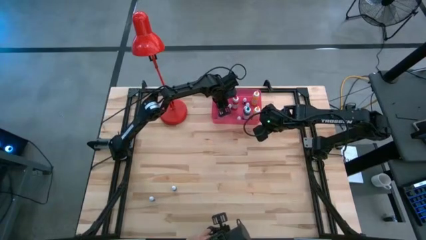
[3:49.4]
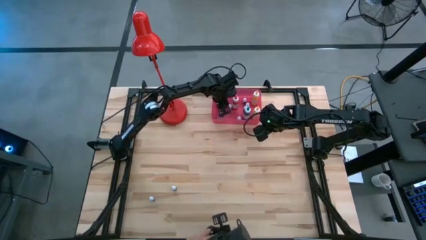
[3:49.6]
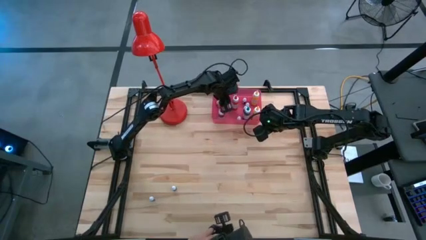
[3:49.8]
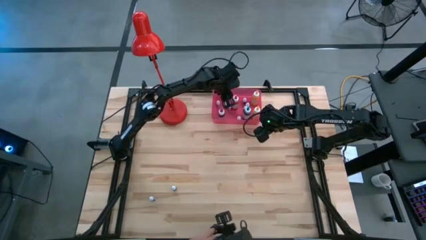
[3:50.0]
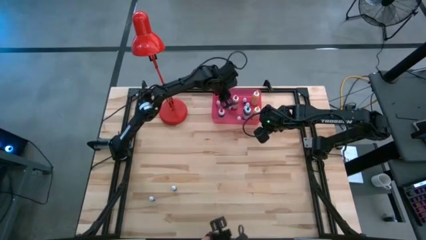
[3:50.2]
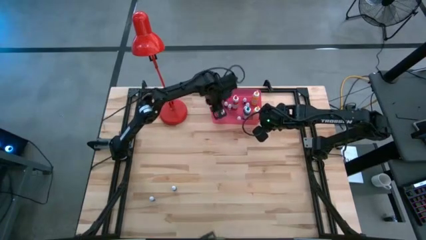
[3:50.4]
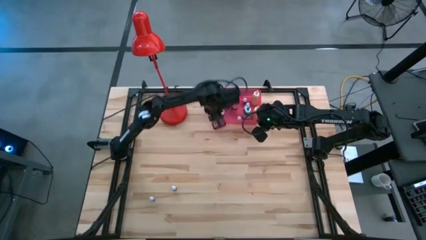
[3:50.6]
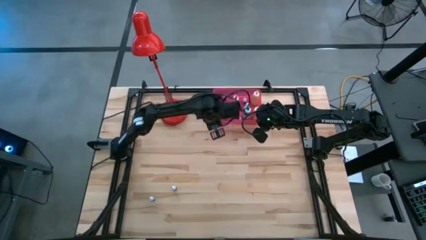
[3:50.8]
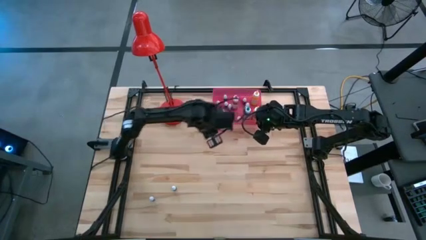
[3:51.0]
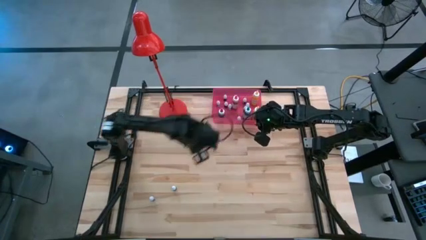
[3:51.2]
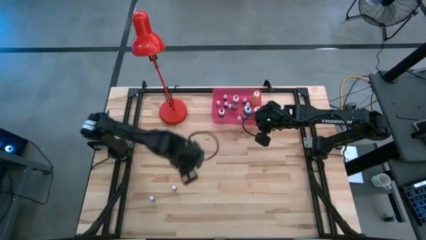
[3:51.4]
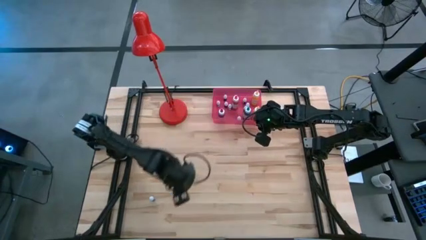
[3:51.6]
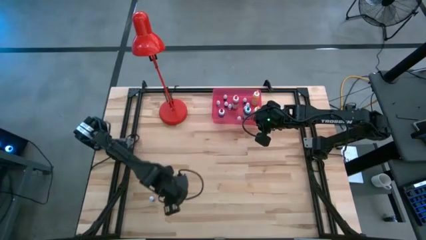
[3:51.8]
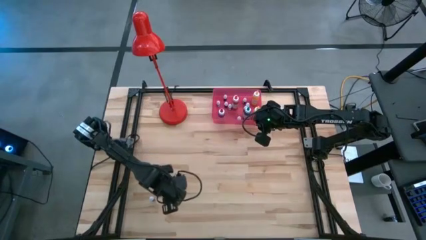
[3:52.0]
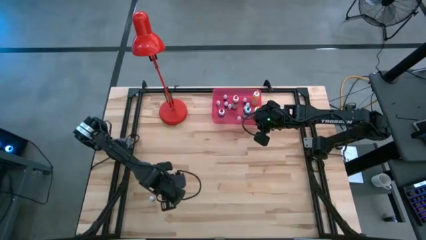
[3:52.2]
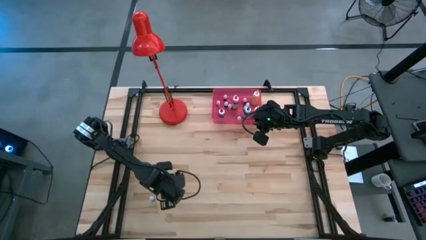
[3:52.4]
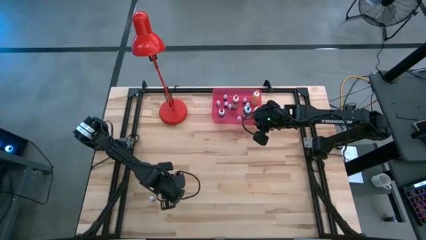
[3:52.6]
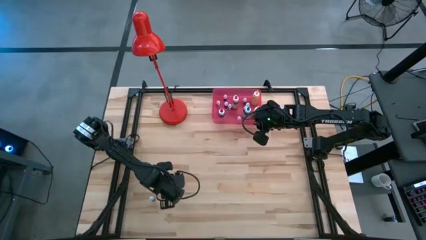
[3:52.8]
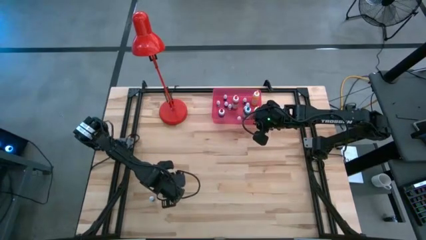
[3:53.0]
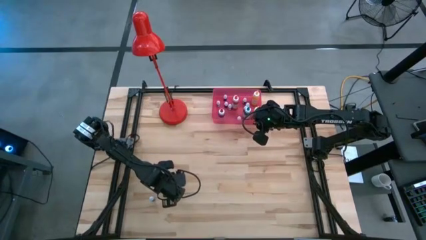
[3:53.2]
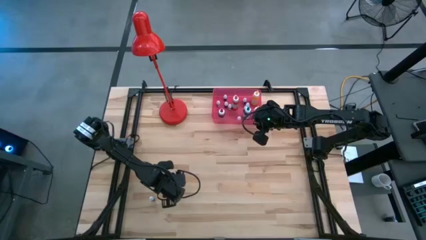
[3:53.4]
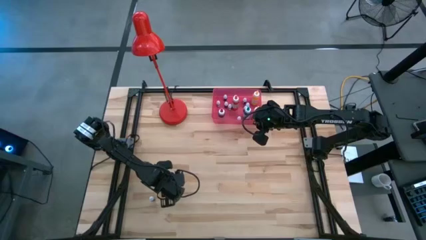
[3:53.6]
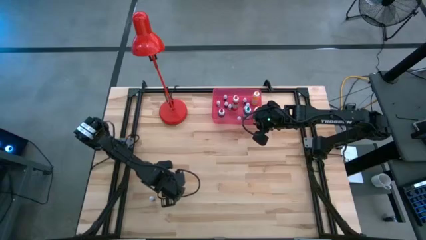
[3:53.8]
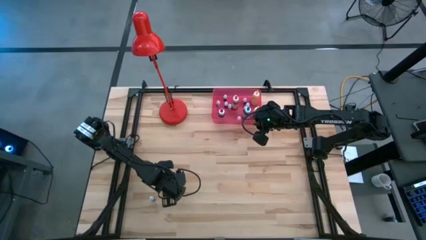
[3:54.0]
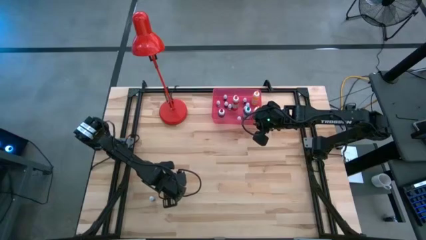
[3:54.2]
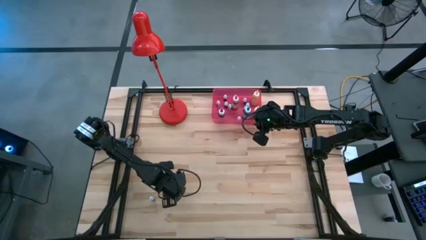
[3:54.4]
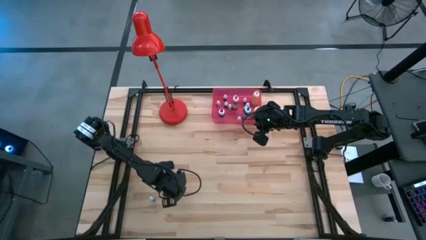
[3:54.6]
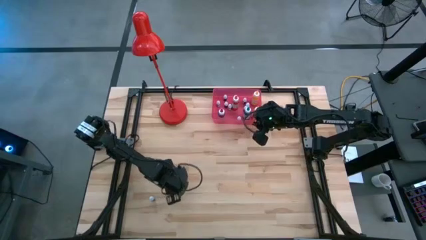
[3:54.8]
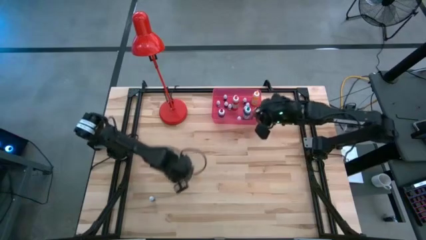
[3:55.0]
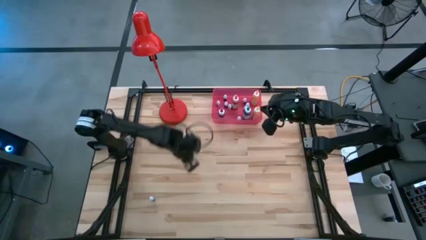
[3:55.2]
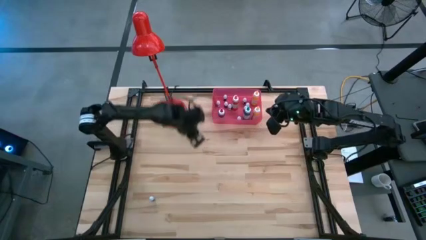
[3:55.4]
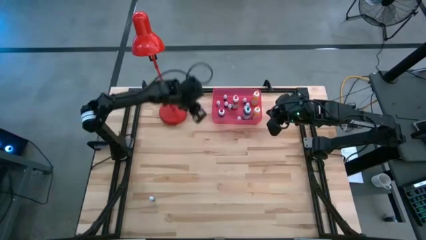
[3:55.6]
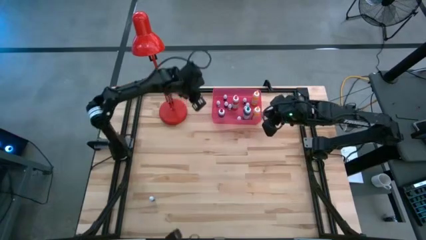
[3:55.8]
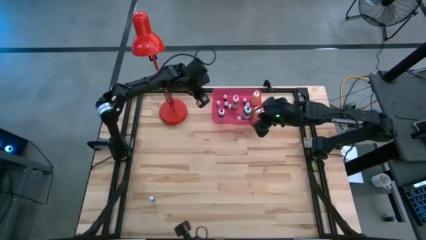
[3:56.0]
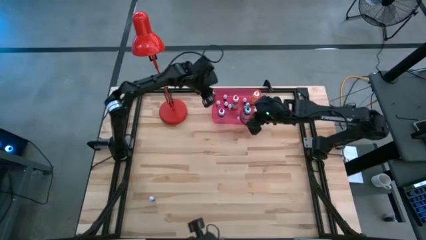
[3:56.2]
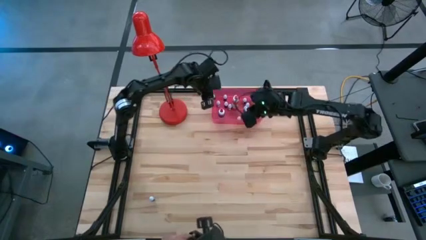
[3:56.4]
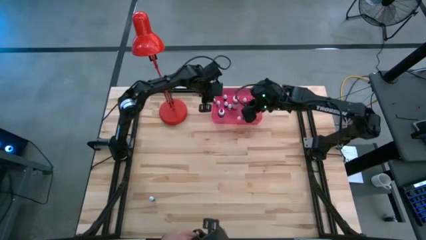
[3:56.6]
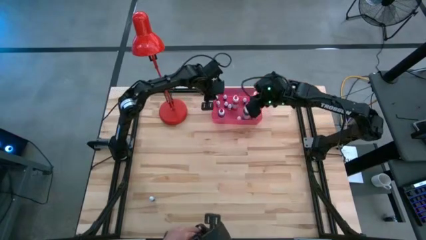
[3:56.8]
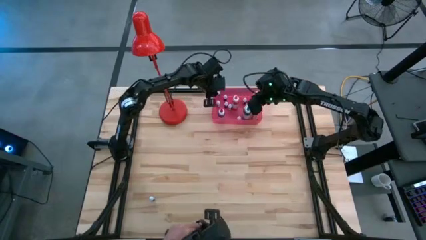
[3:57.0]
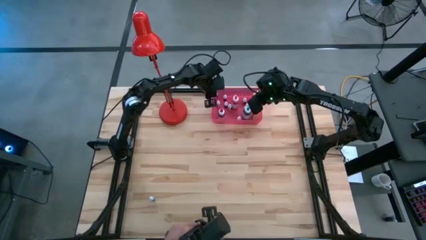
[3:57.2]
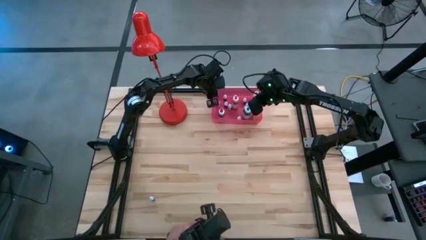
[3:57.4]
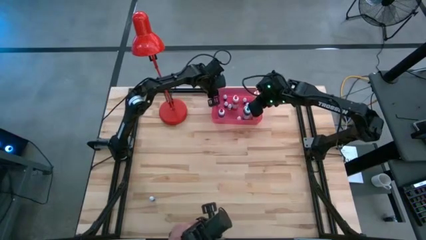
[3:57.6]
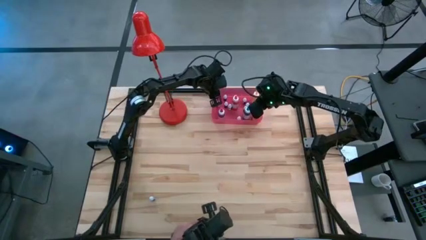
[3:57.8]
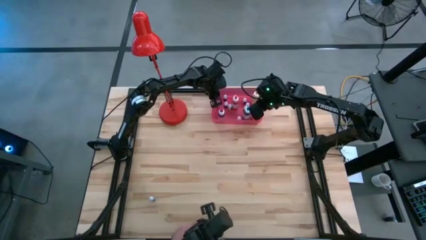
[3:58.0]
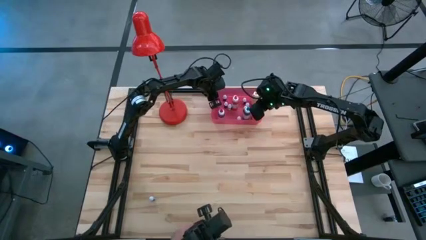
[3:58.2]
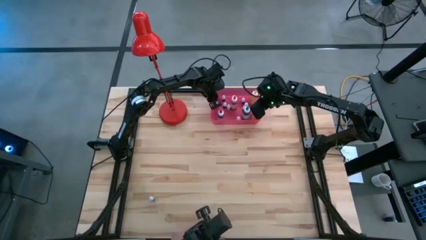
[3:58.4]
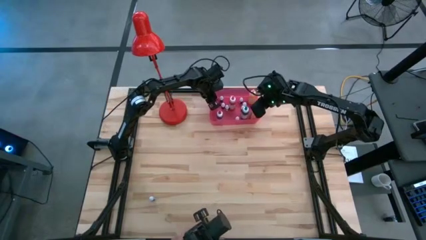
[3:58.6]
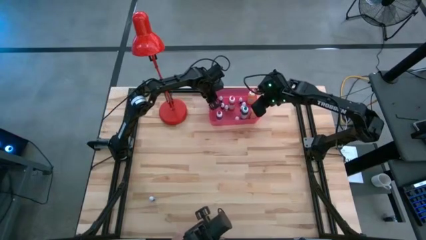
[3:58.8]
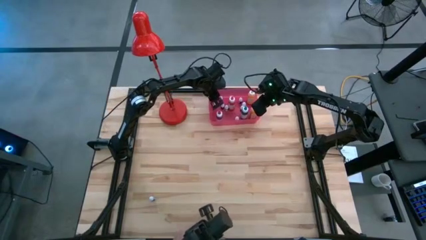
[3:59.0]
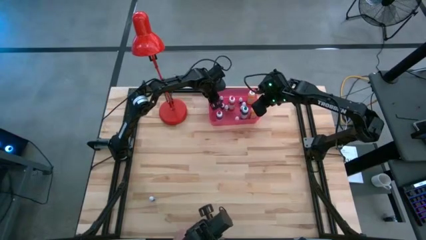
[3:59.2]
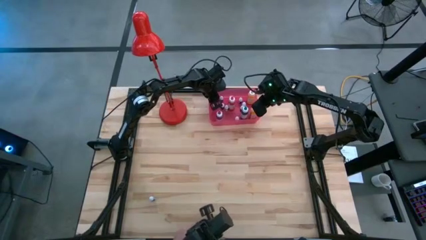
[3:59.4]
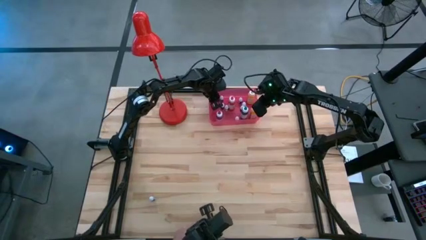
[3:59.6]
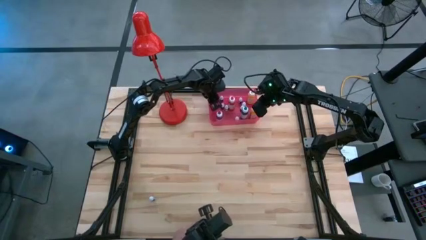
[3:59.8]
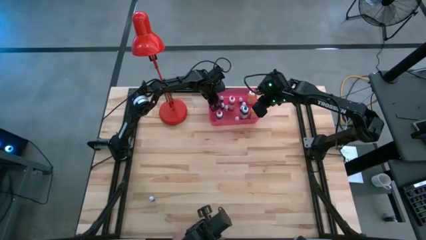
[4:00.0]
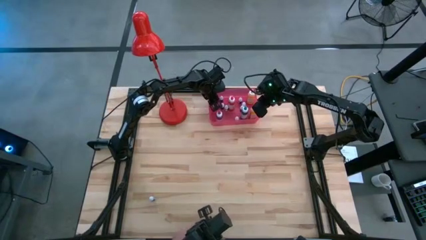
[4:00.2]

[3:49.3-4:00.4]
Task: Pick & Place food coloring
Put the small purple food coloring bottle into the red bin

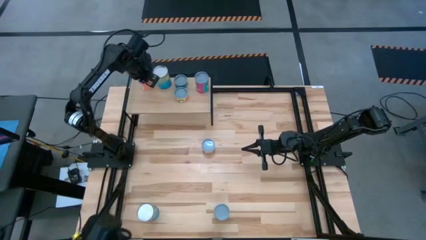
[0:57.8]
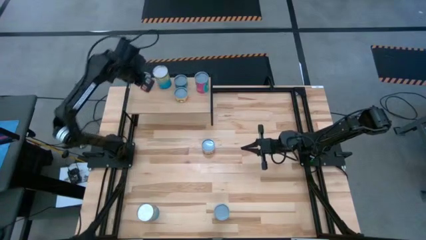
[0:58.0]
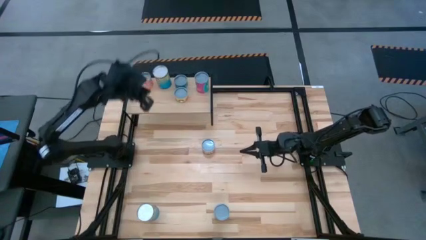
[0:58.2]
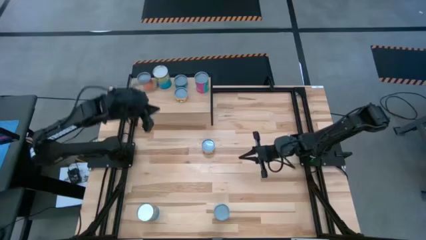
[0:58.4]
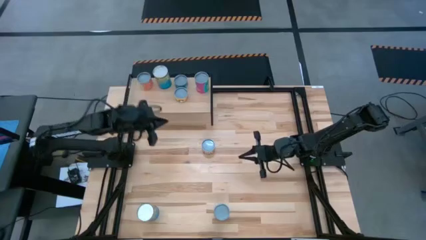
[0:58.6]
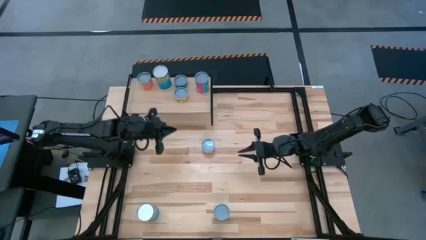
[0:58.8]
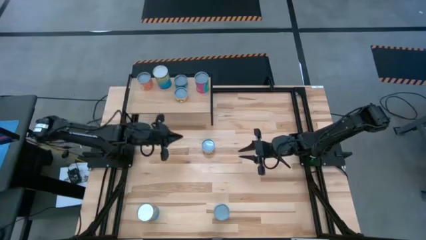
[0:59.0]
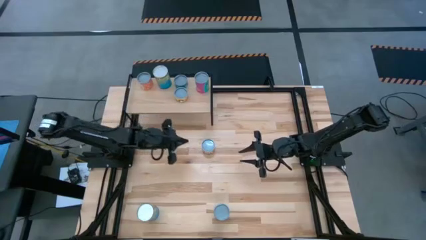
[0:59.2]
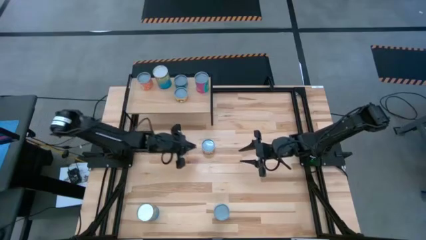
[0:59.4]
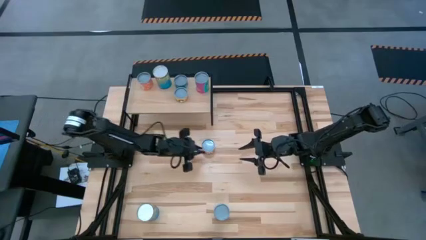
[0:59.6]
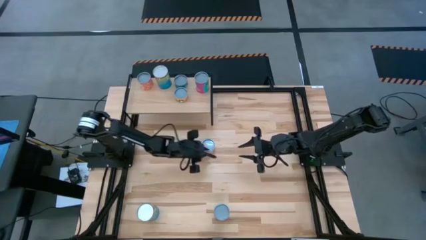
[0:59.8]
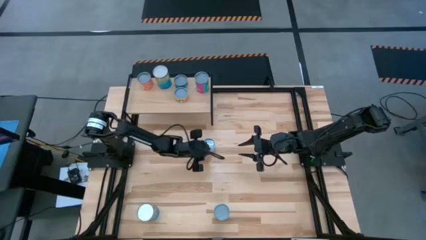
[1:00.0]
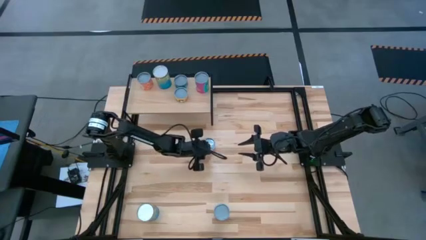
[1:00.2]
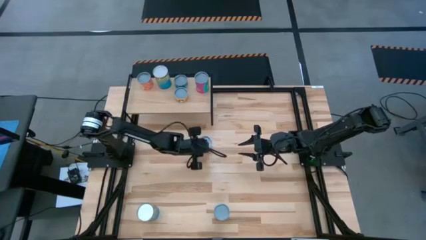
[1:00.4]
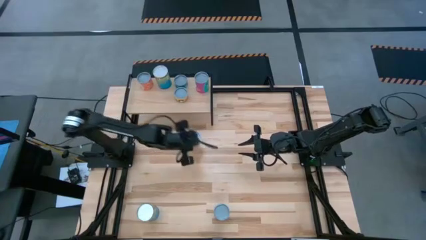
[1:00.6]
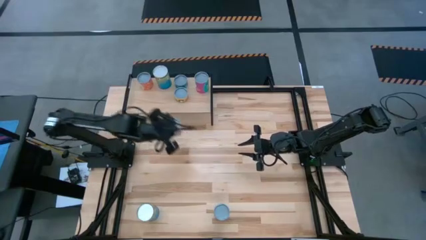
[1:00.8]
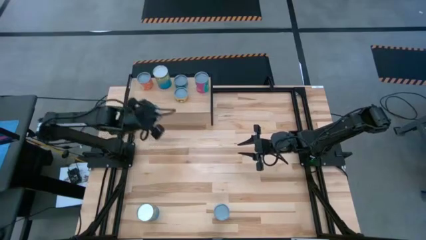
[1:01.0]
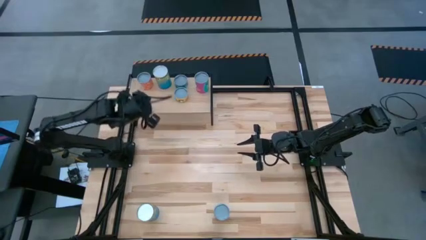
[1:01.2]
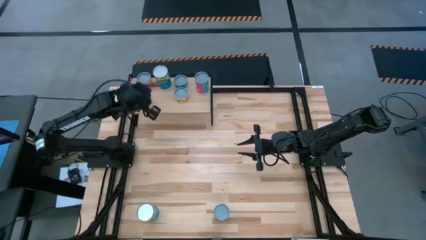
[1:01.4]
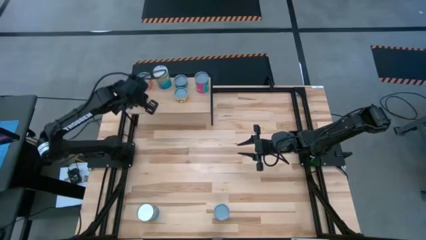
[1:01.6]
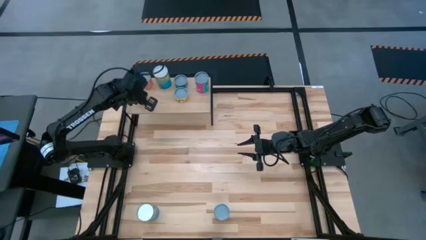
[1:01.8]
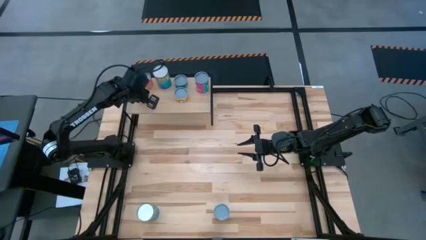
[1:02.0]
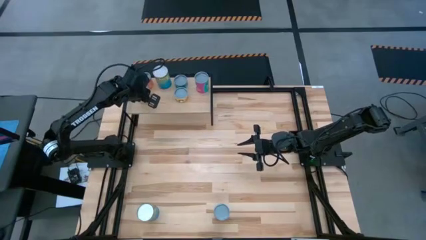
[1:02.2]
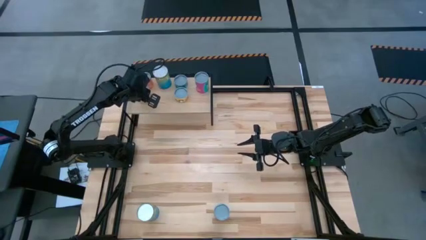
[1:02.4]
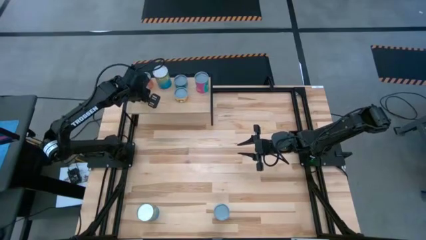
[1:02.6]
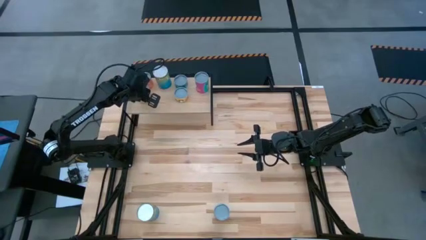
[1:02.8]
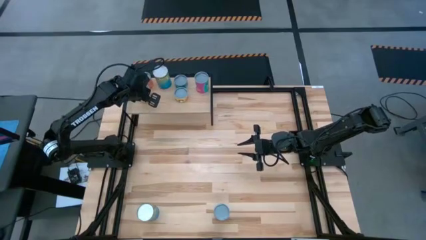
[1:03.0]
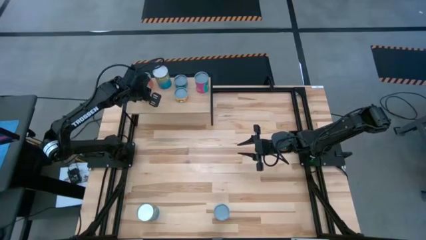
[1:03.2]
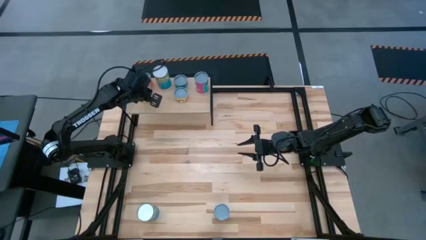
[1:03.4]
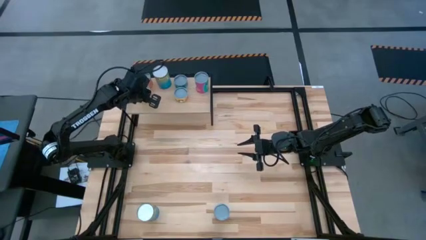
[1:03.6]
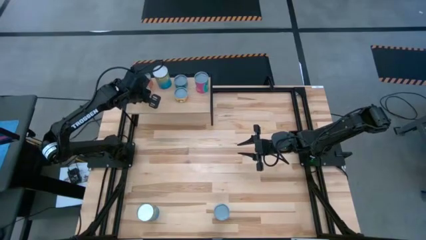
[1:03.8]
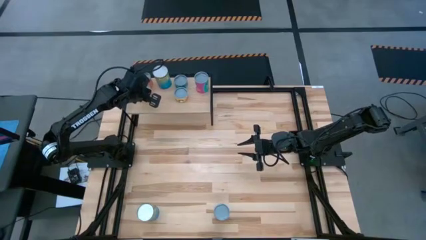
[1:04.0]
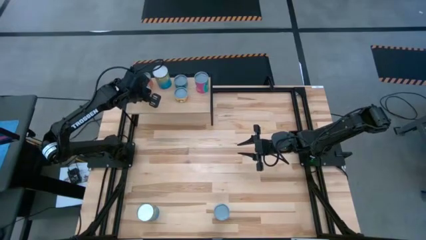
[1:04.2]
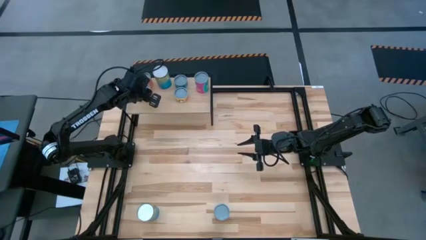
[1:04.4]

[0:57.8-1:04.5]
Task: Pick and place cans onto a shelf
Put the canned black beans on the shelf
